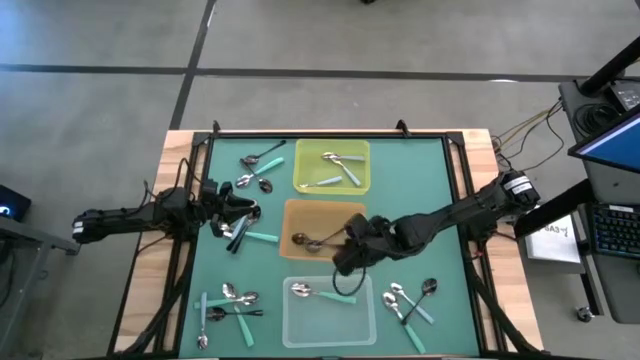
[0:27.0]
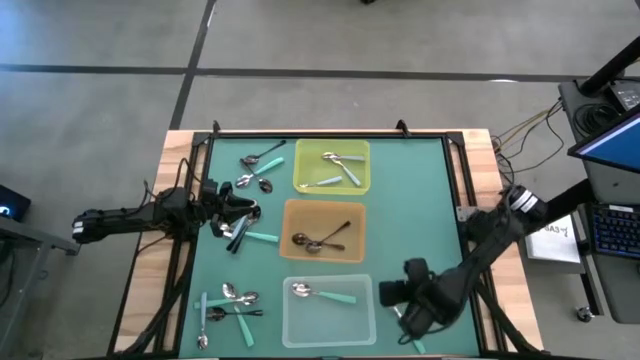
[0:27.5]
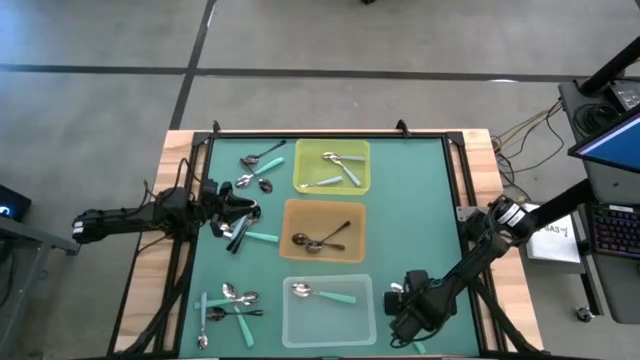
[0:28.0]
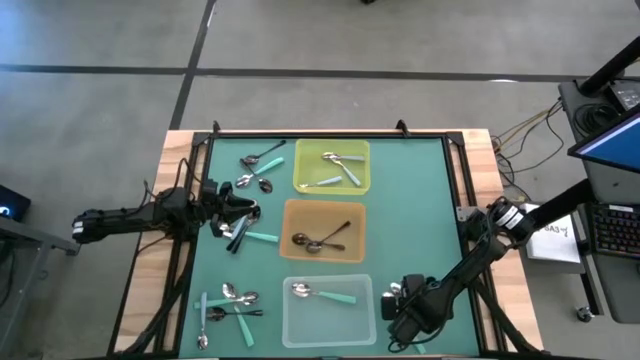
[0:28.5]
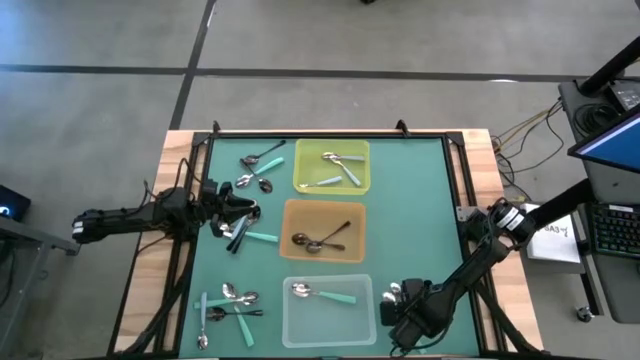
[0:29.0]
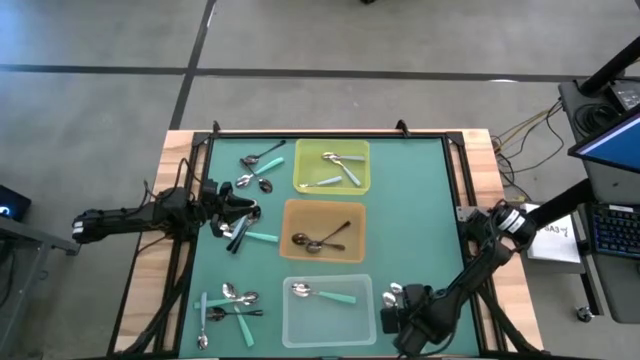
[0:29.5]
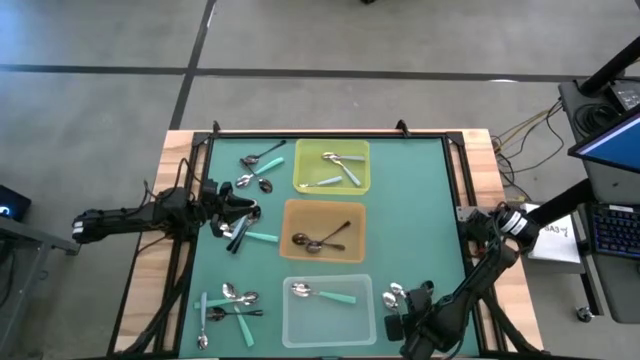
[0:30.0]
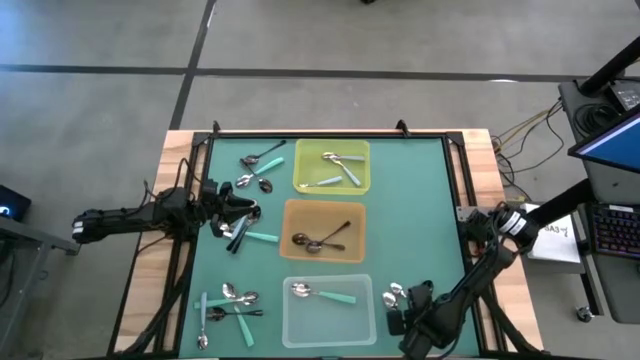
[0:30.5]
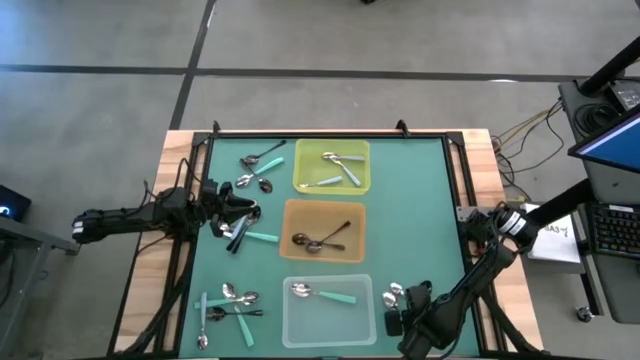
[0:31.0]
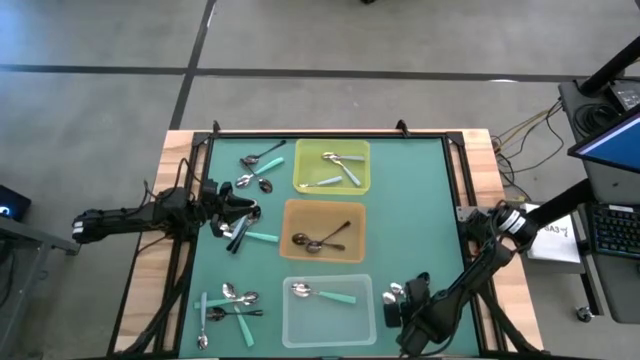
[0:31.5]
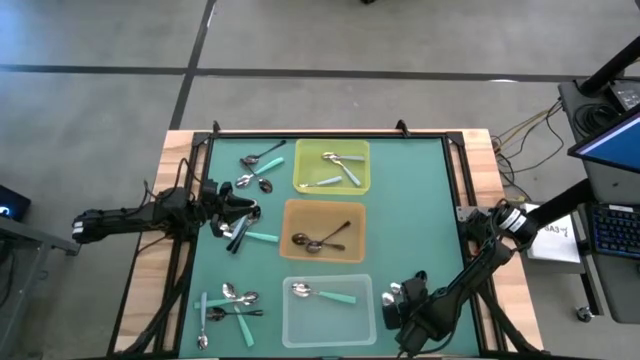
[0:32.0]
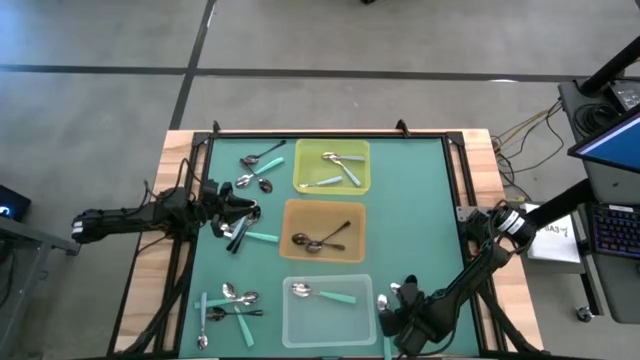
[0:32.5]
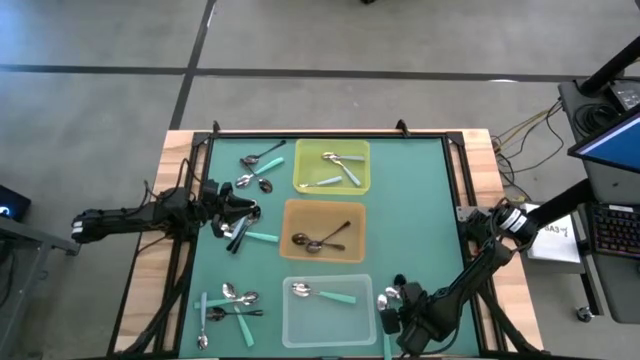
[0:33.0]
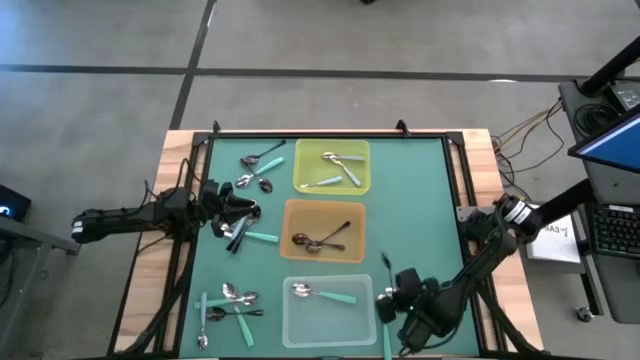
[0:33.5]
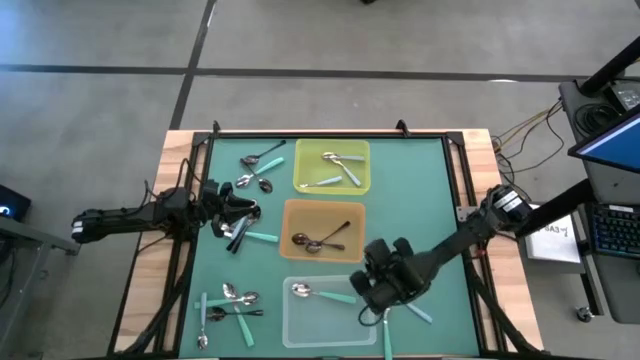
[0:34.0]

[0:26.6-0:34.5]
Task: Sort silverware by color (type)
Put the black spoon into the orange bin

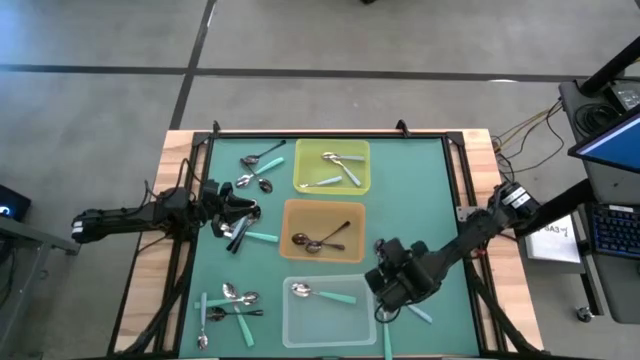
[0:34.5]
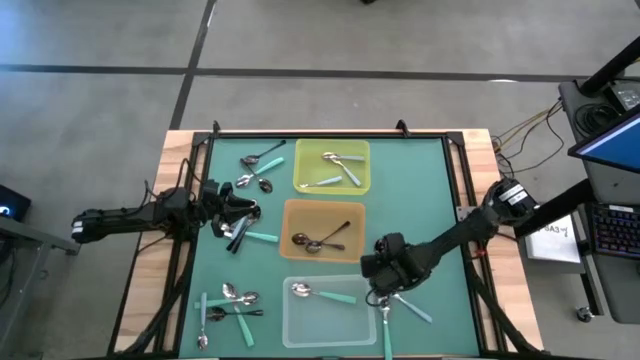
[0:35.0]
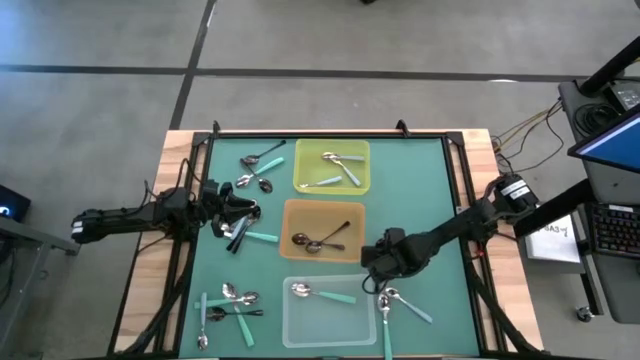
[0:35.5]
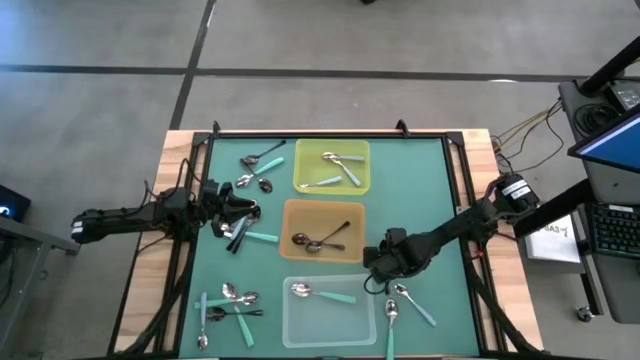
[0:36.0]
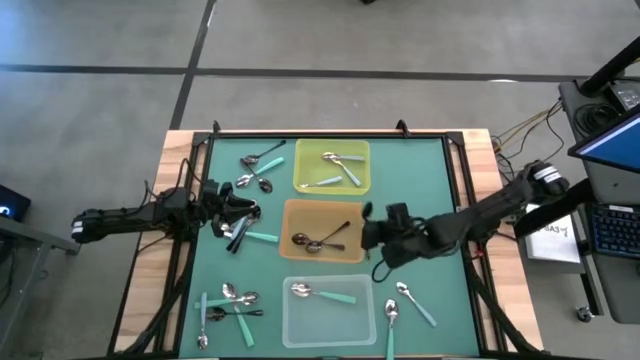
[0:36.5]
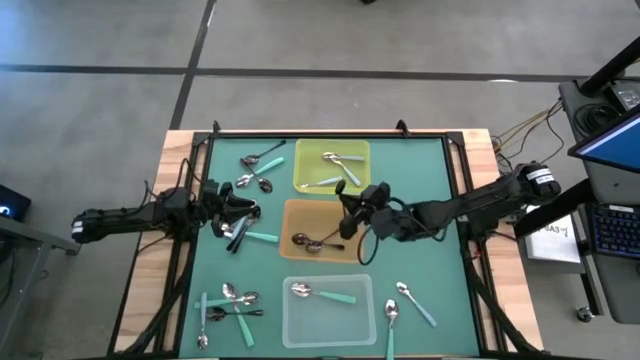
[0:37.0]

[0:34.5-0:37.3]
Put the black spoon into the orange bin

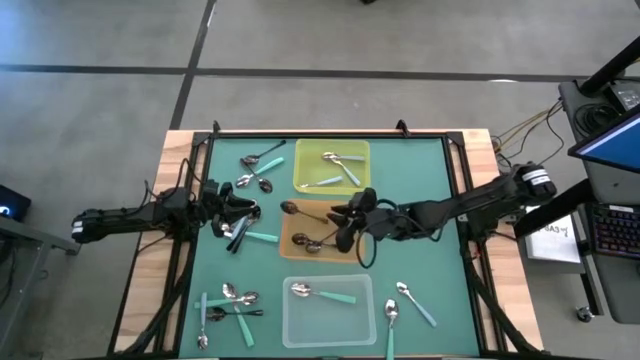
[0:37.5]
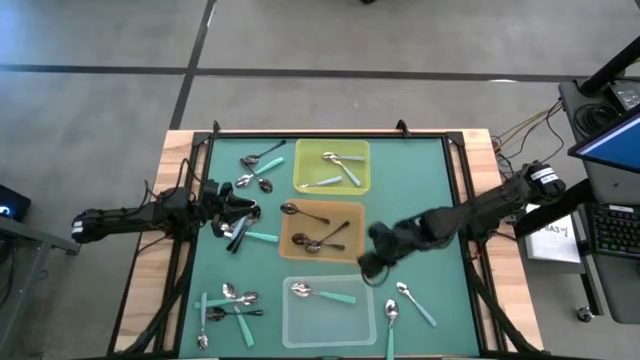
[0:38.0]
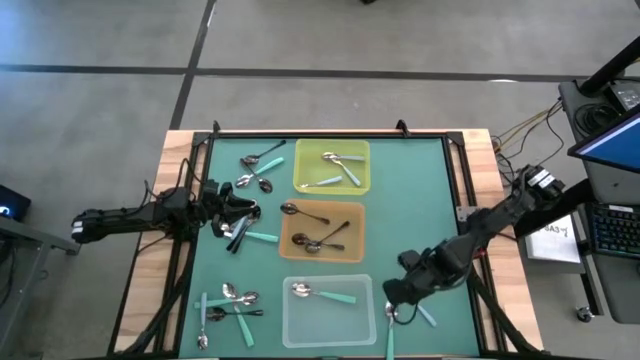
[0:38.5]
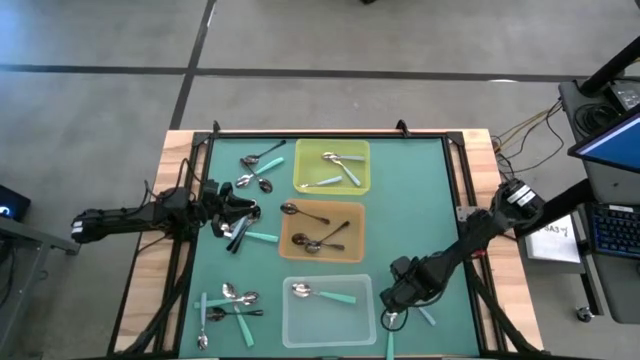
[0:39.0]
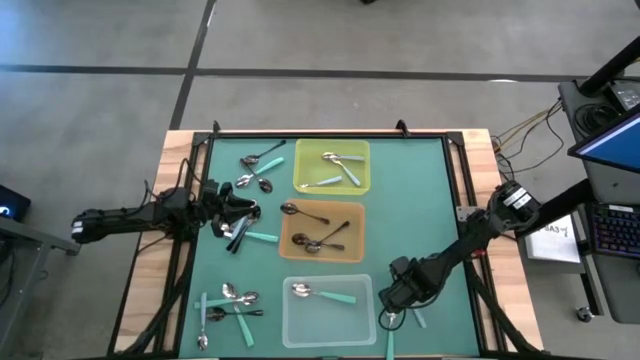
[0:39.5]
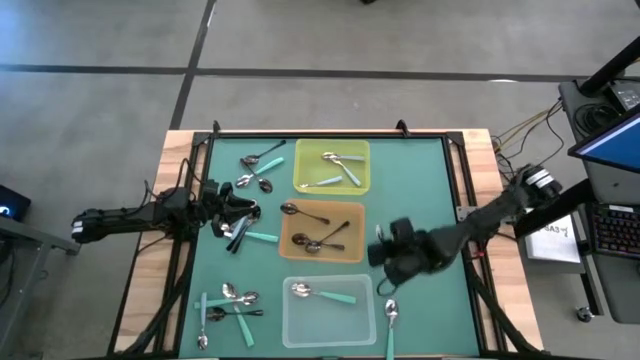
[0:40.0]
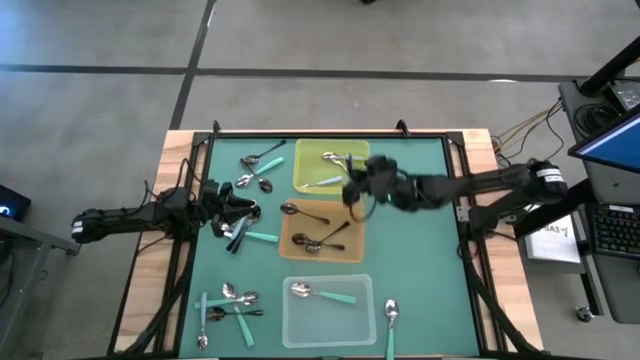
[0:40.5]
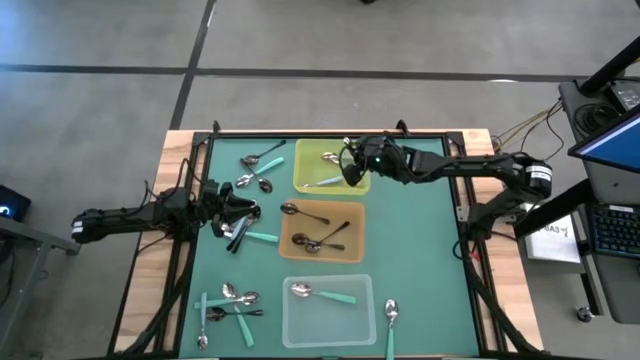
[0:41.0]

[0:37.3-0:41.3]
Put the blue spoon into the yellow bin

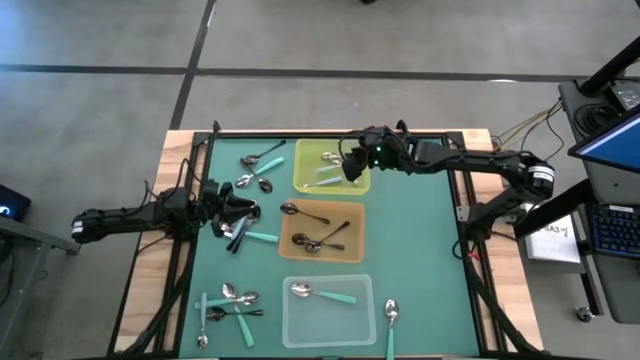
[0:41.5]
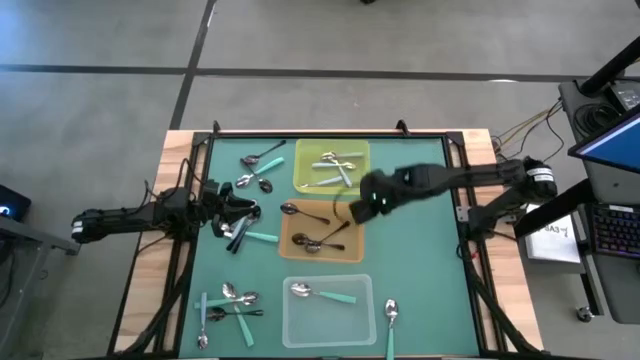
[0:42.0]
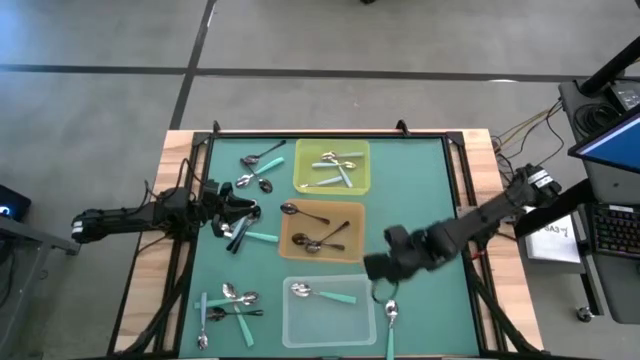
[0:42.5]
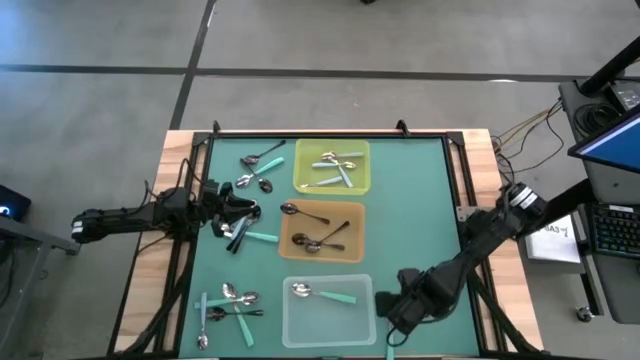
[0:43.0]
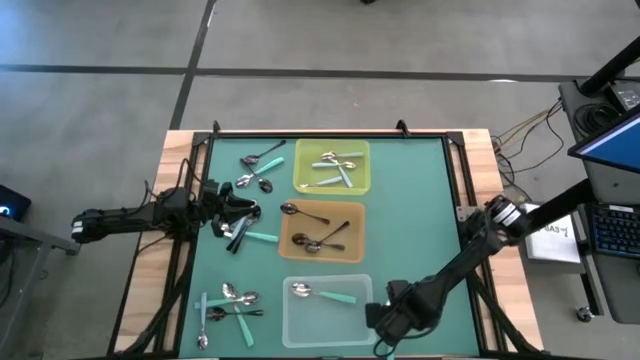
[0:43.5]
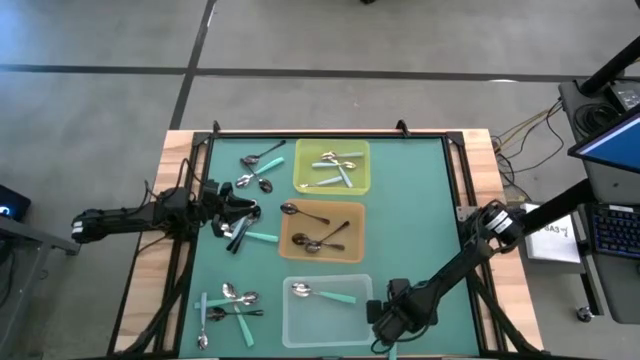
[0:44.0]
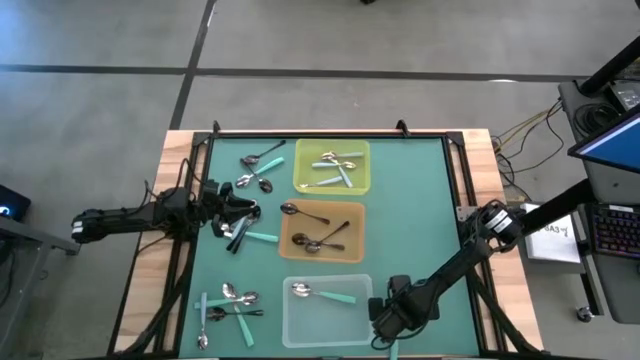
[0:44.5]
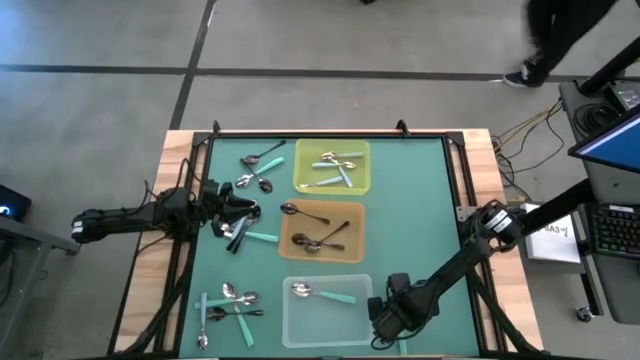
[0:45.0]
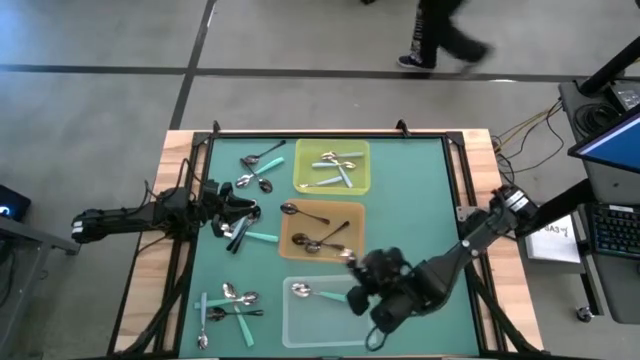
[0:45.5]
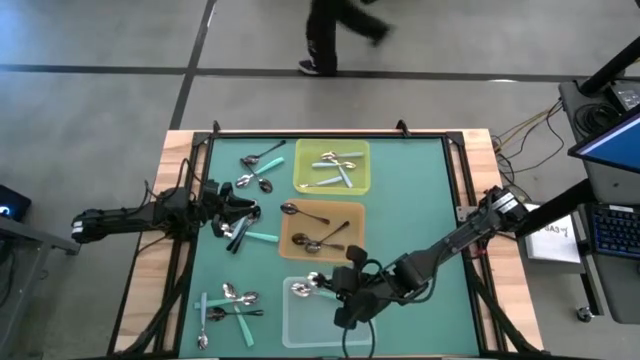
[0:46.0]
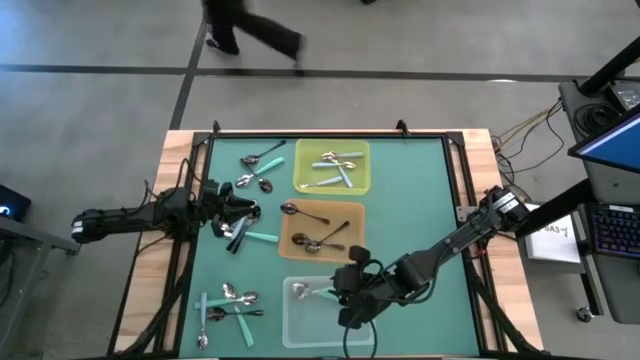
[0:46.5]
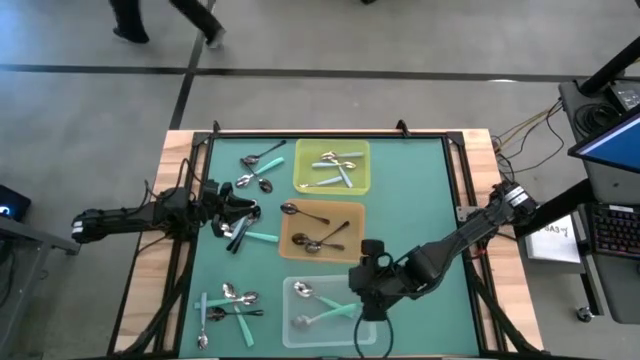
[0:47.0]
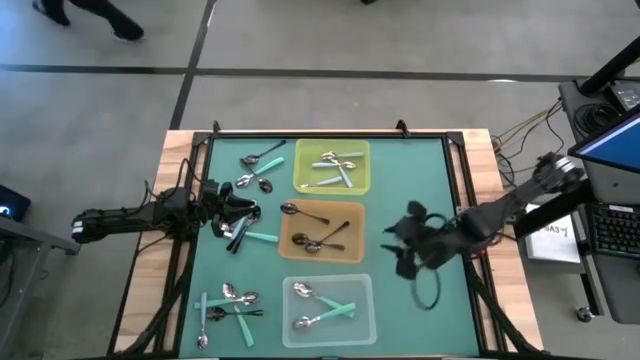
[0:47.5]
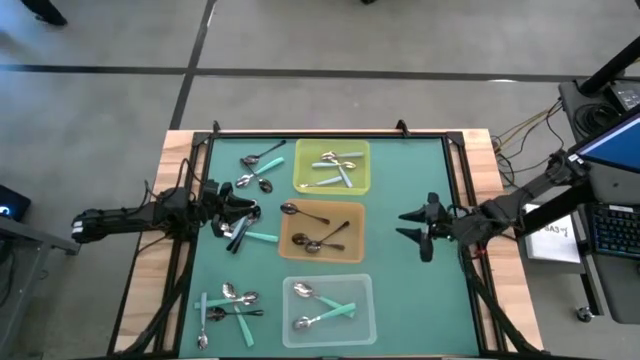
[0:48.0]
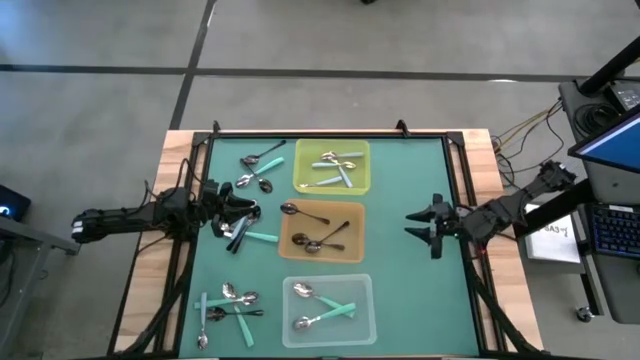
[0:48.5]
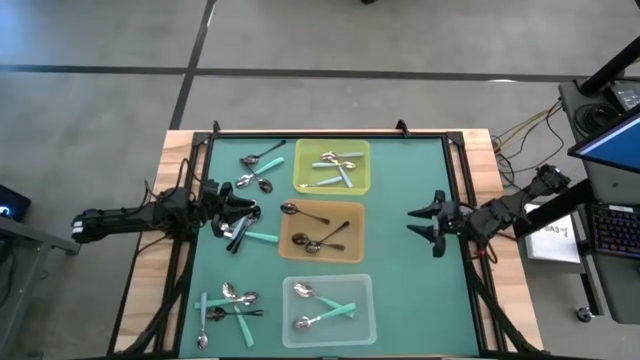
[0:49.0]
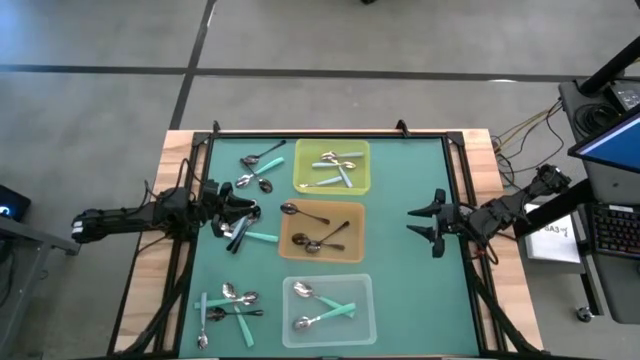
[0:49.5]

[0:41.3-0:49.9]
Put the green spoon into the transparent bin
